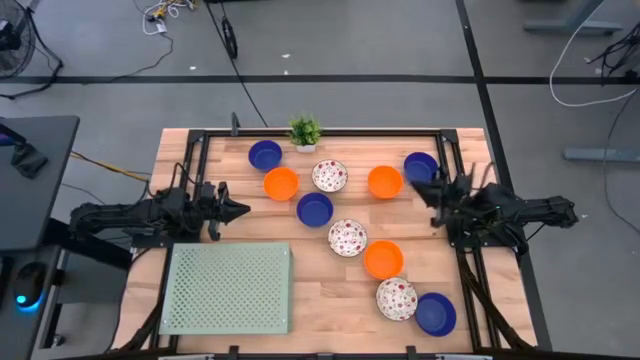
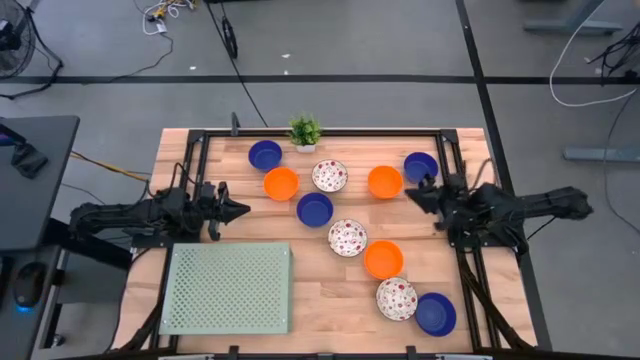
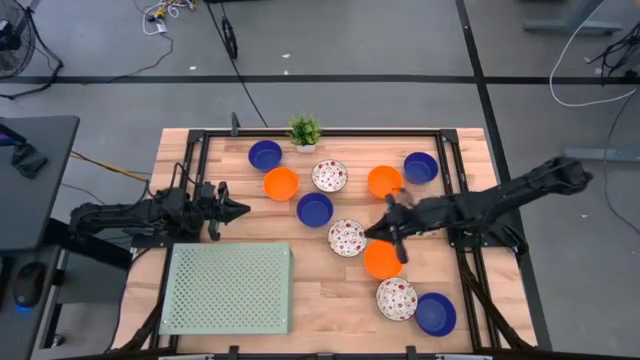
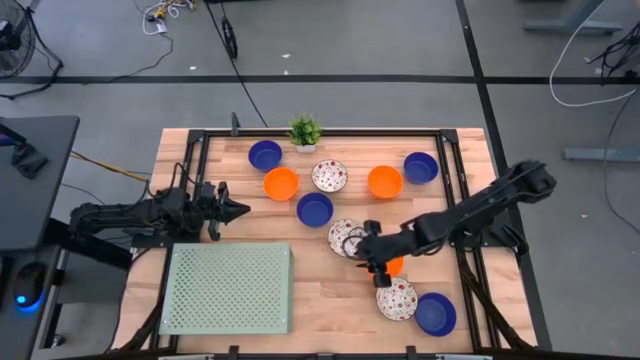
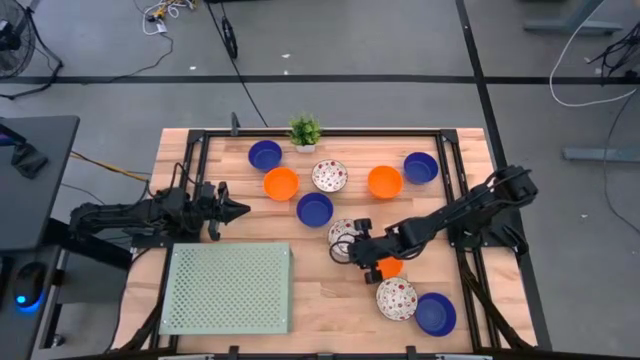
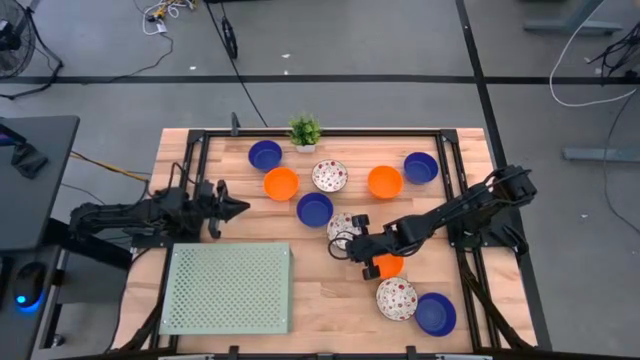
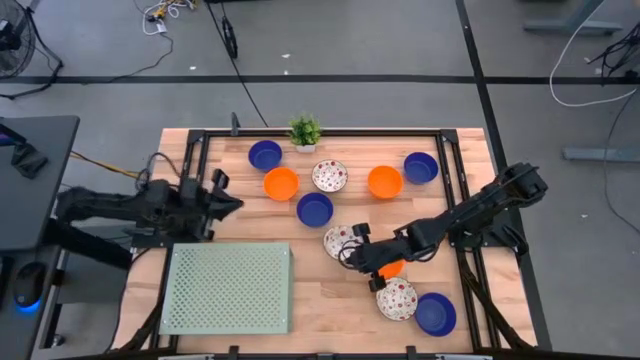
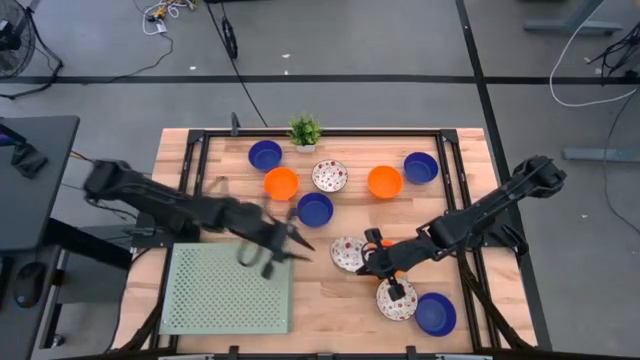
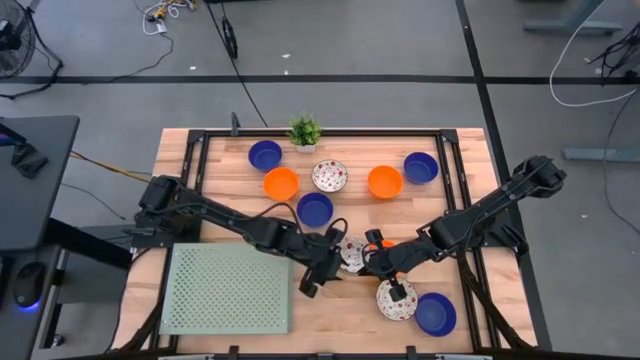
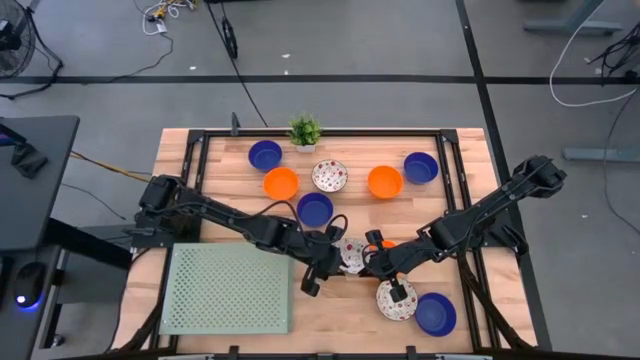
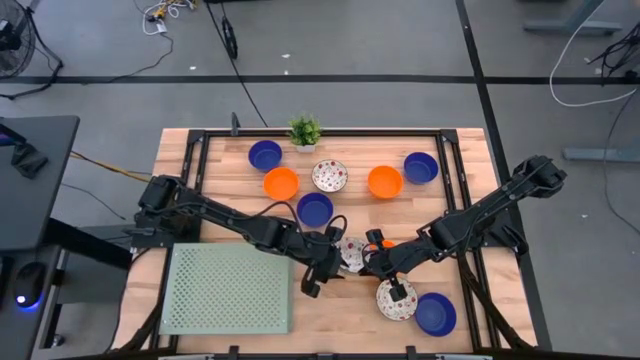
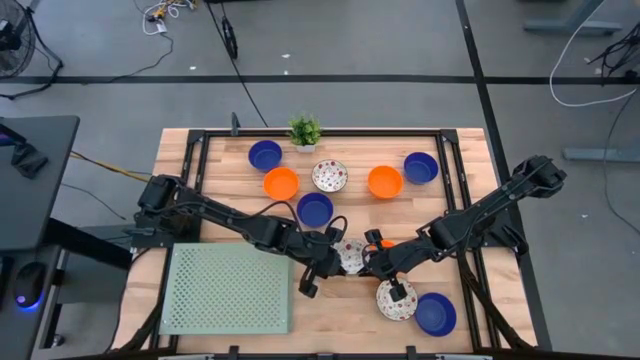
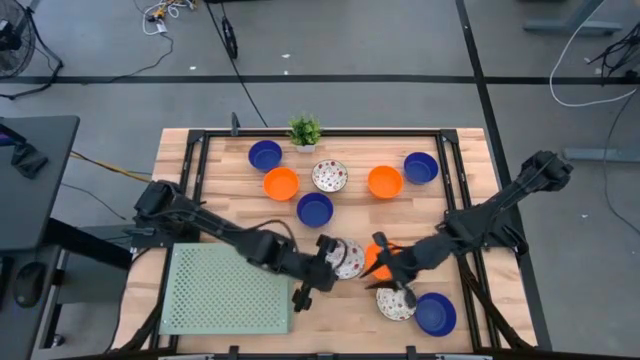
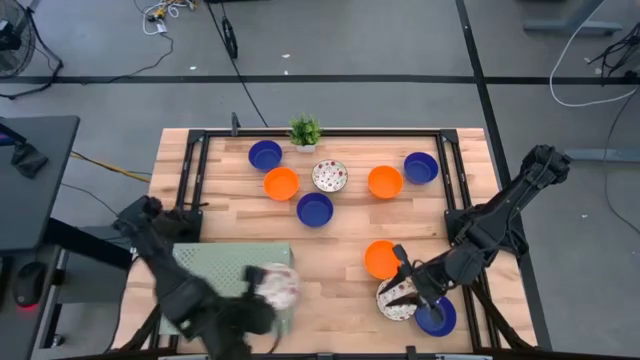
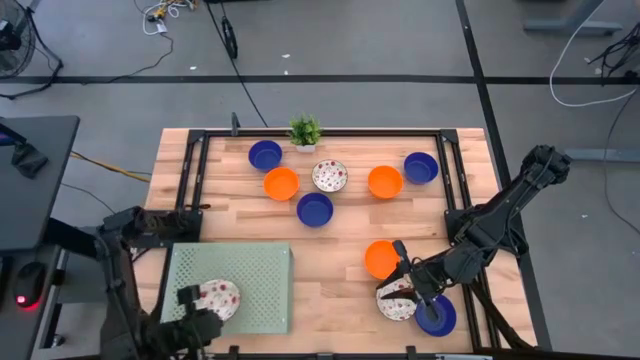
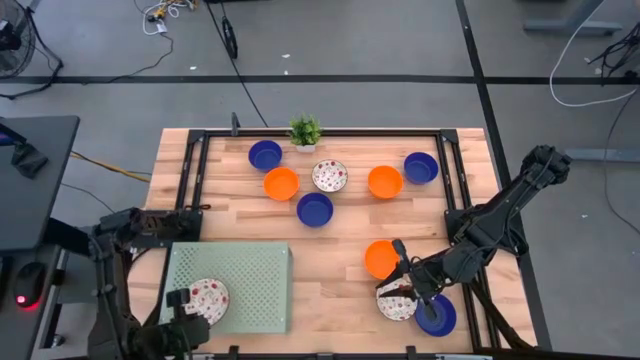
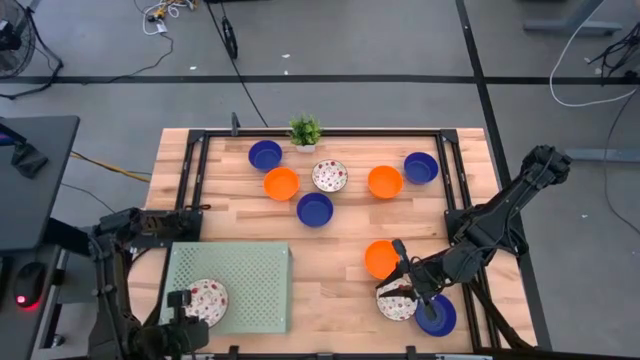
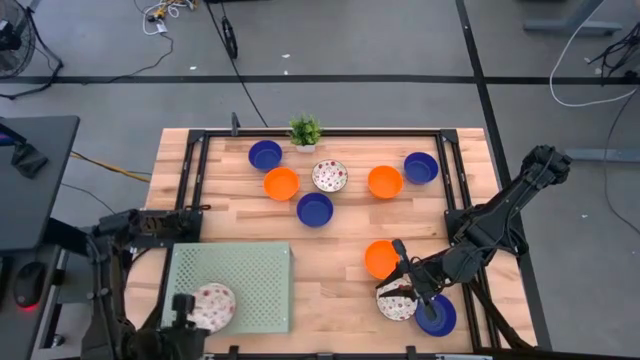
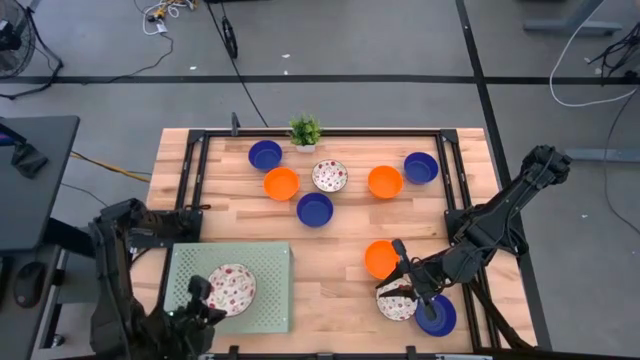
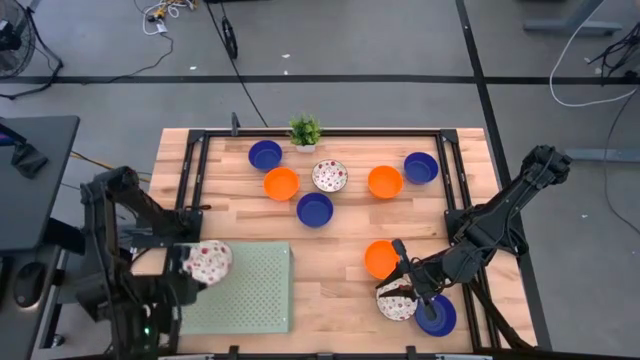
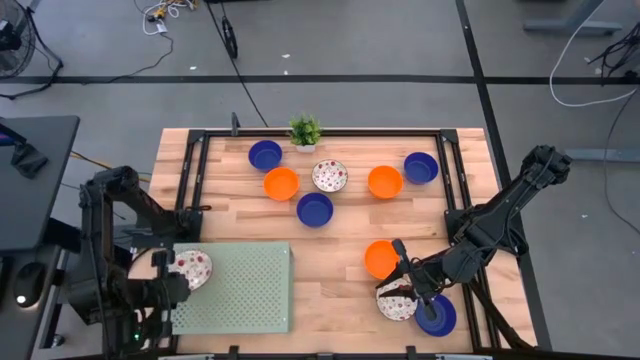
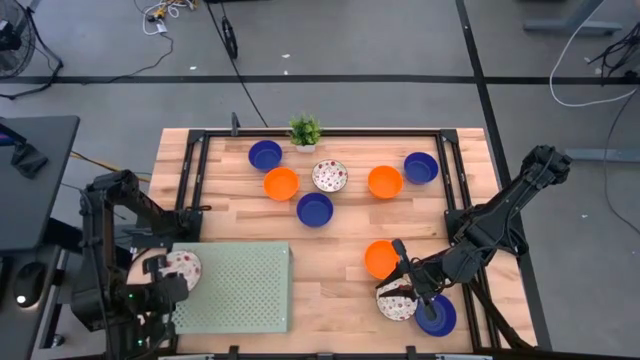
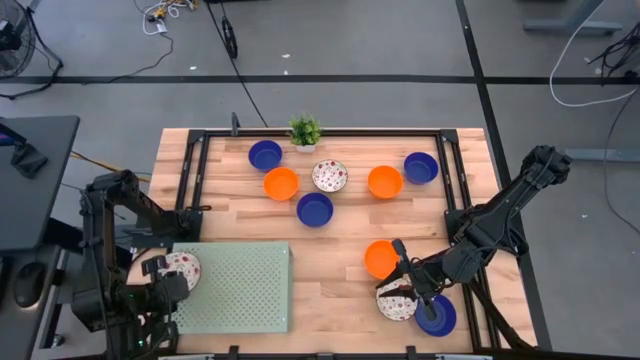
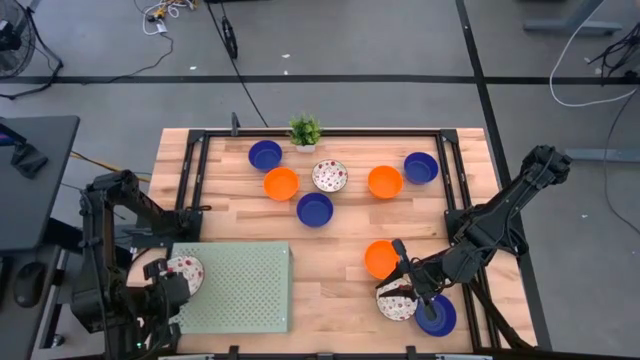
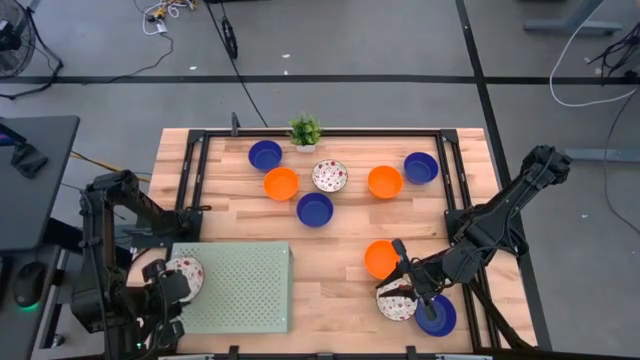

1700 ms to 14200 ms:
Task: Pick & Place Mini bowls
Put the white bowl on the shelf

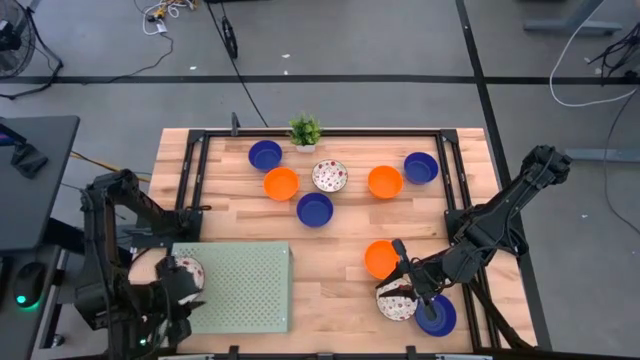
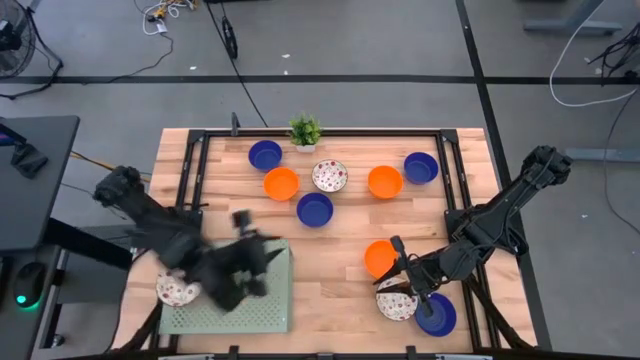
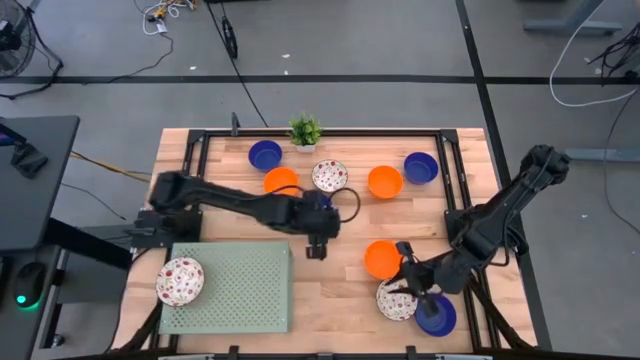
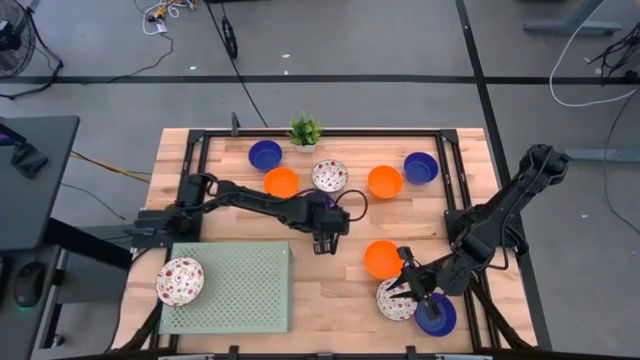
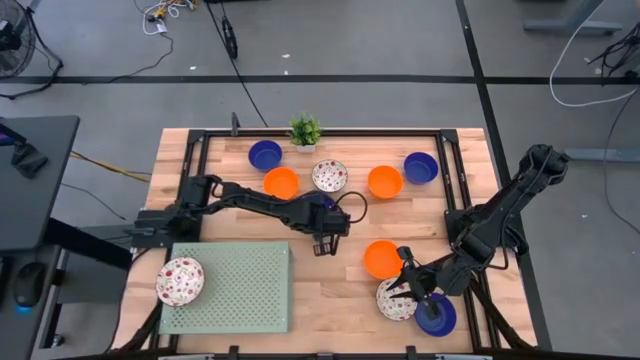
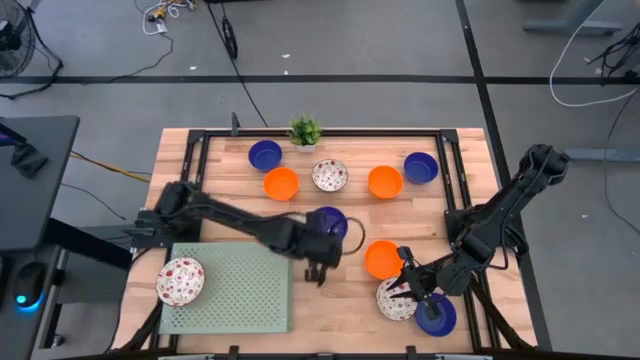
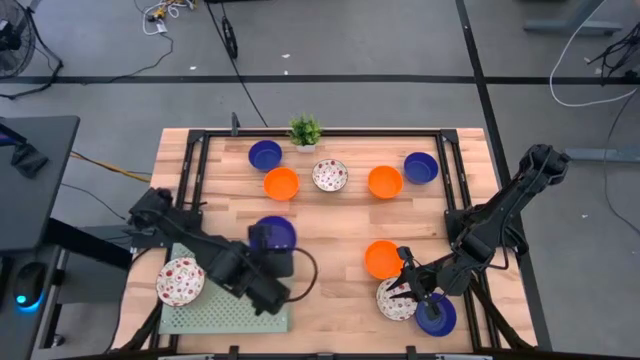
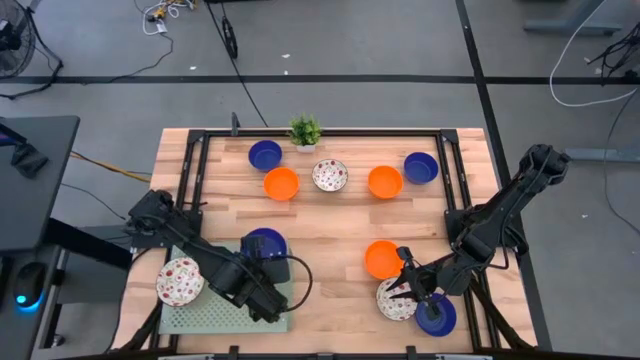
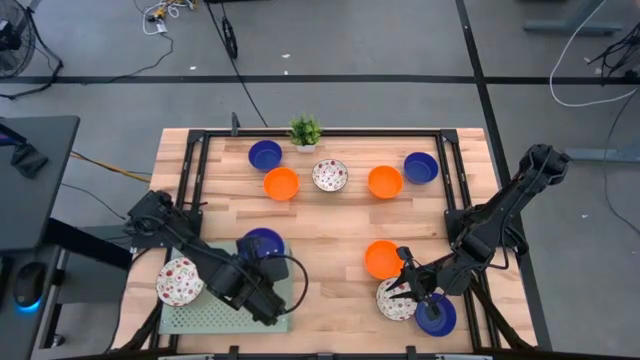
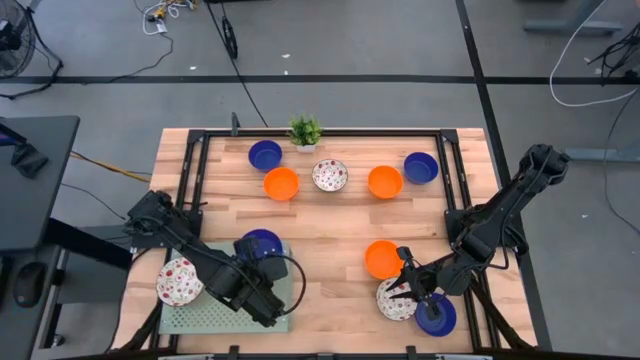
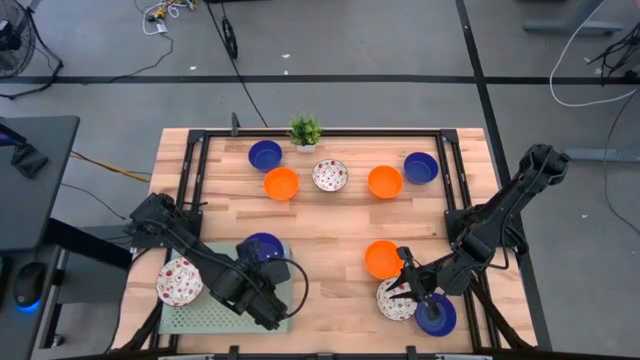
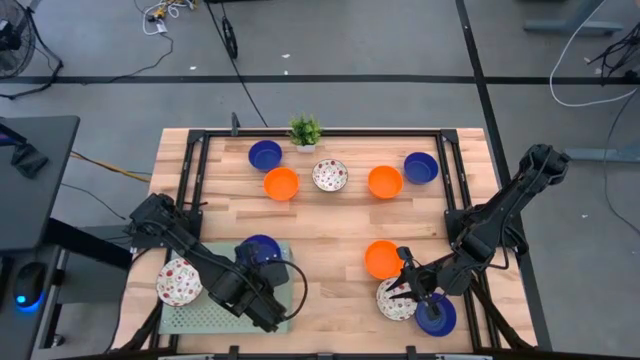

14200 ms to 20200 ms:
Put the blue bowl on the shelf

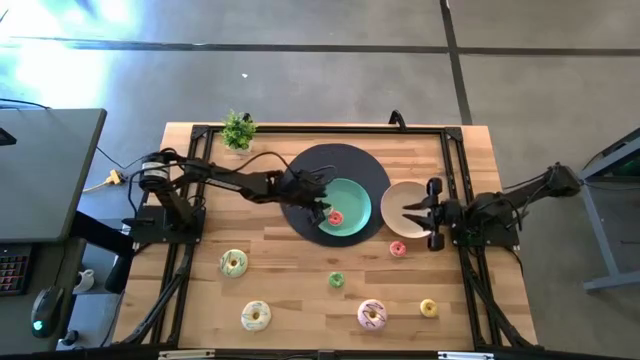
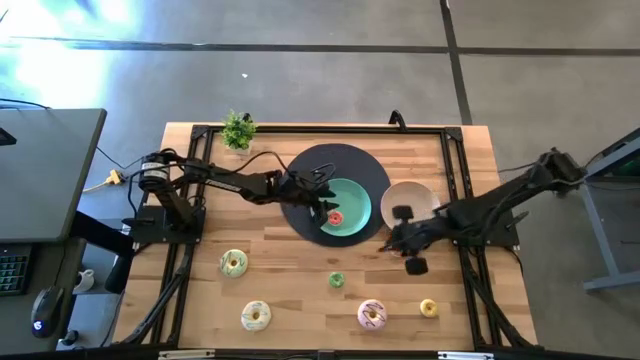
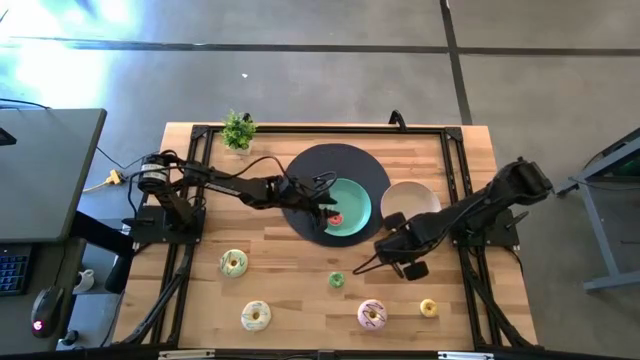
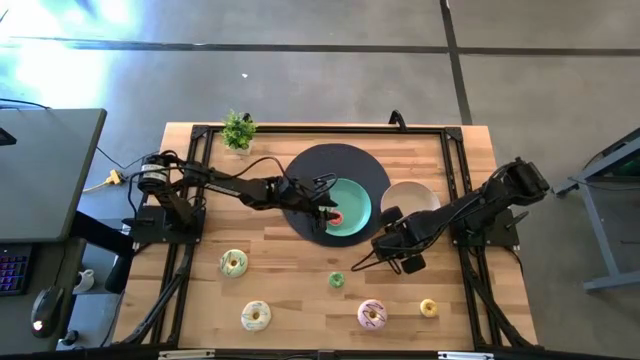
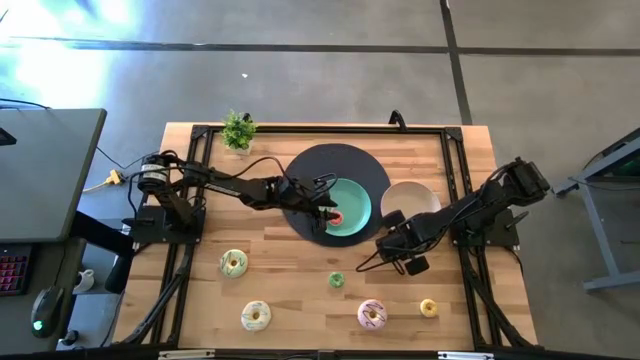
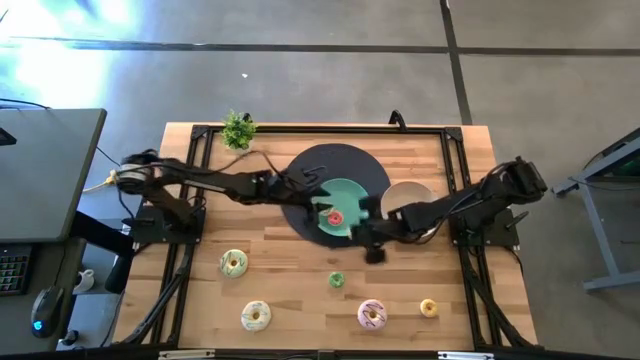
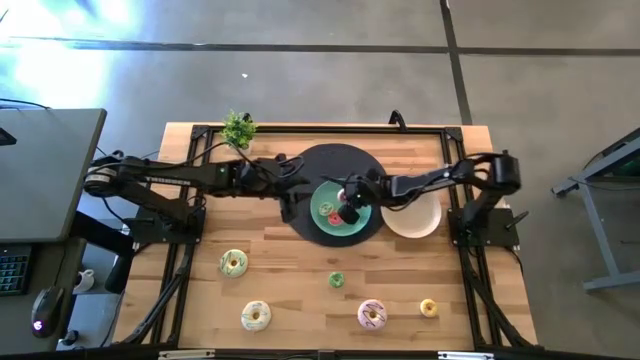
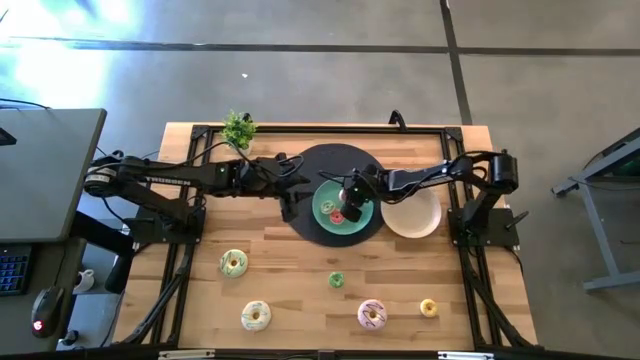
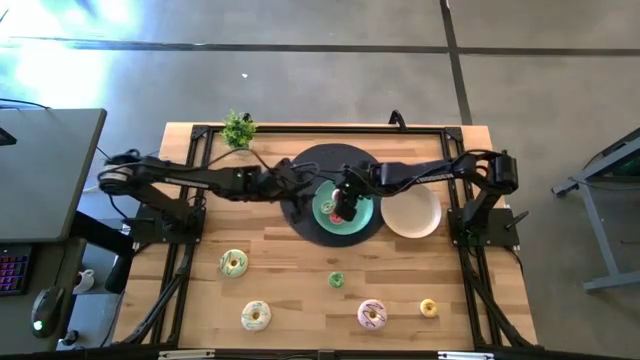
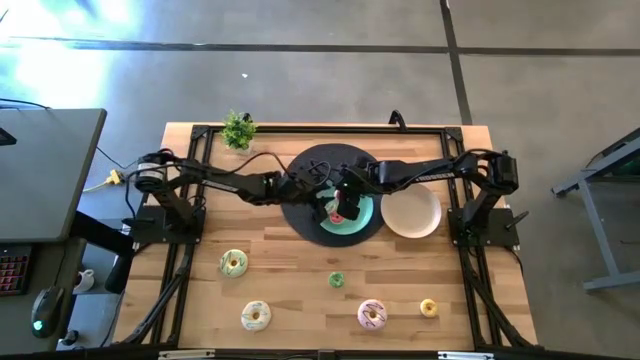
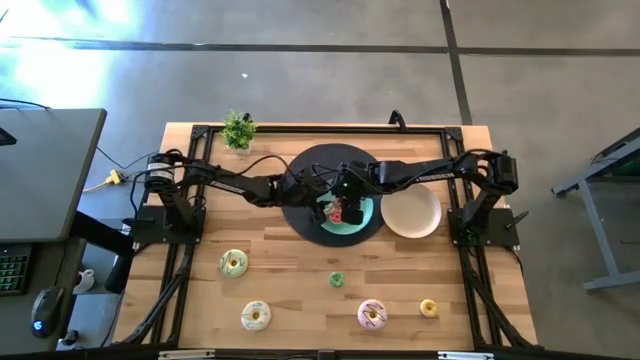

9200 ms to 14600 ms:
Task: Pick & Place donuts
Put the small pink donut into the blue plate
